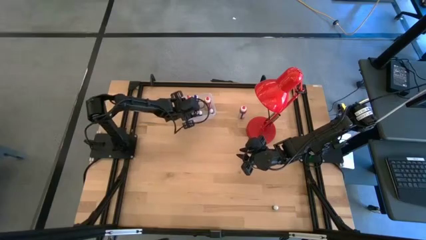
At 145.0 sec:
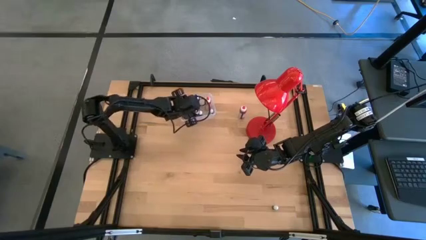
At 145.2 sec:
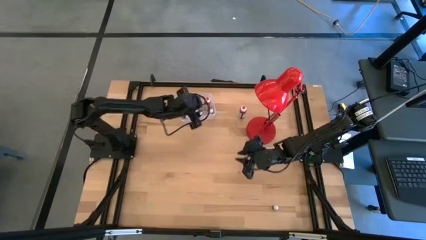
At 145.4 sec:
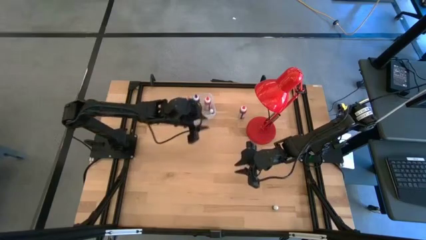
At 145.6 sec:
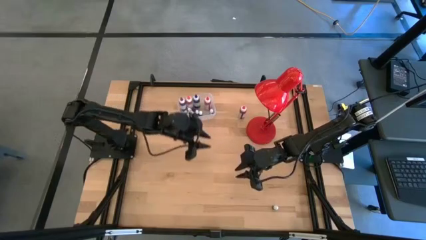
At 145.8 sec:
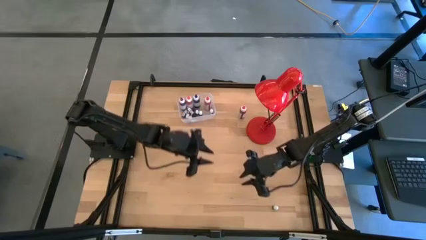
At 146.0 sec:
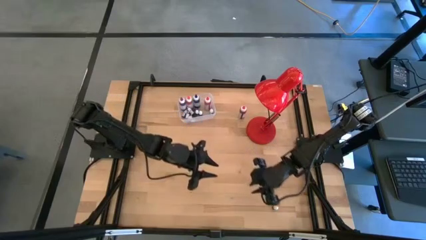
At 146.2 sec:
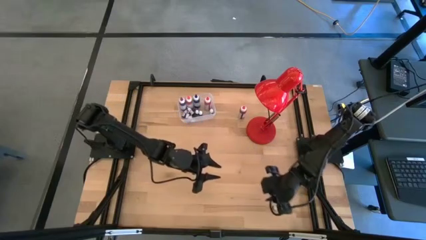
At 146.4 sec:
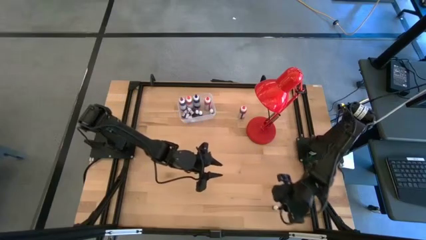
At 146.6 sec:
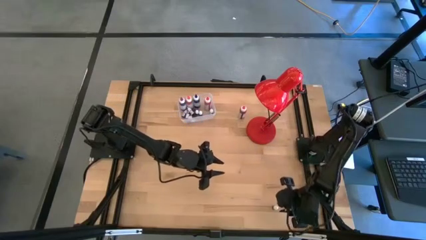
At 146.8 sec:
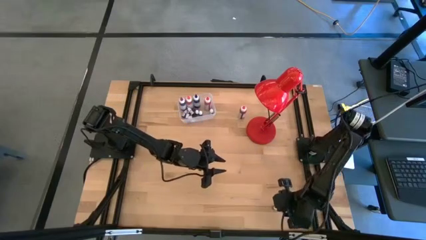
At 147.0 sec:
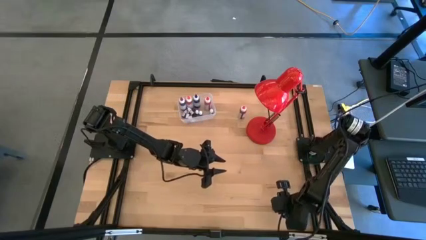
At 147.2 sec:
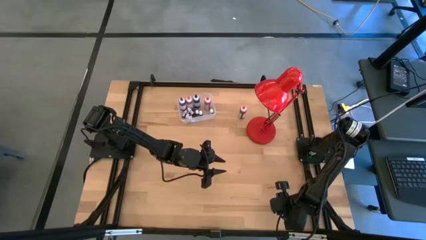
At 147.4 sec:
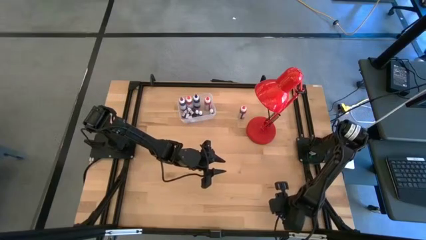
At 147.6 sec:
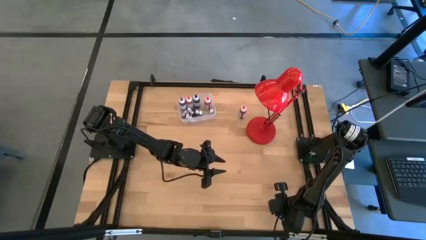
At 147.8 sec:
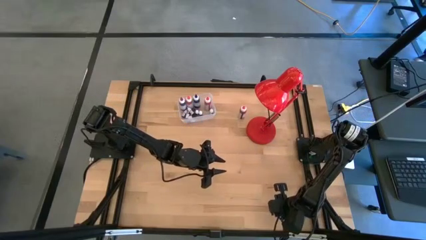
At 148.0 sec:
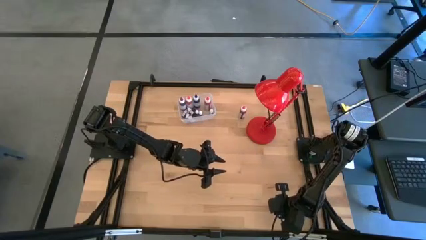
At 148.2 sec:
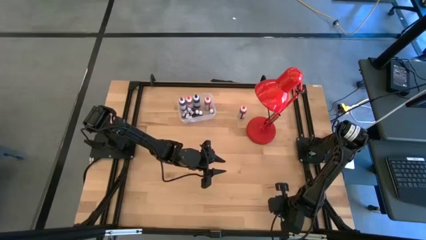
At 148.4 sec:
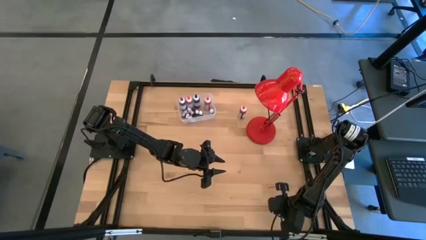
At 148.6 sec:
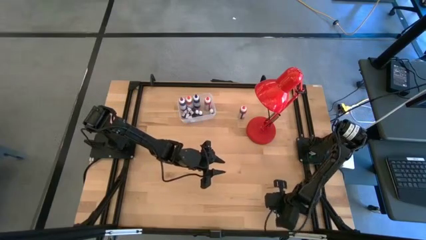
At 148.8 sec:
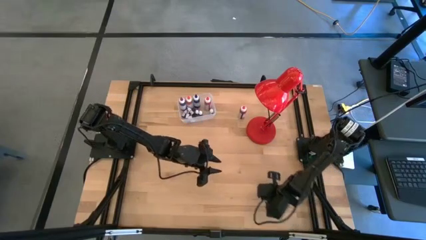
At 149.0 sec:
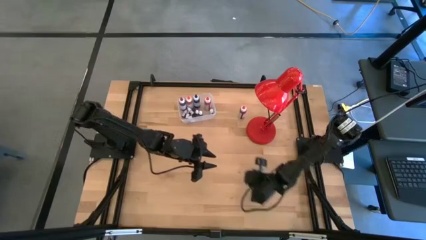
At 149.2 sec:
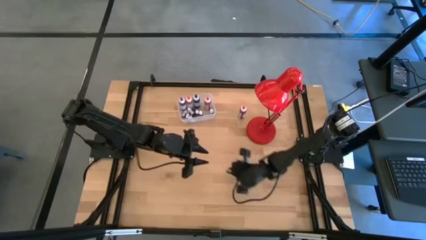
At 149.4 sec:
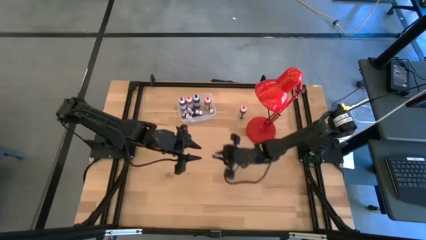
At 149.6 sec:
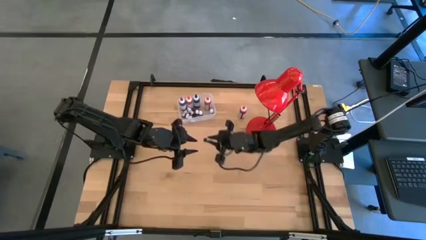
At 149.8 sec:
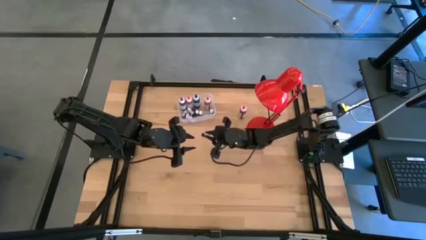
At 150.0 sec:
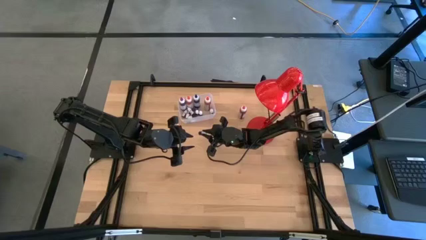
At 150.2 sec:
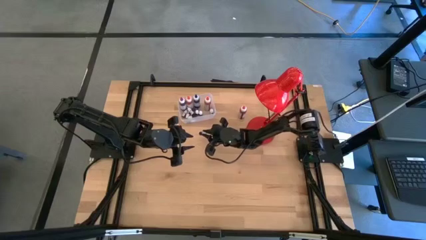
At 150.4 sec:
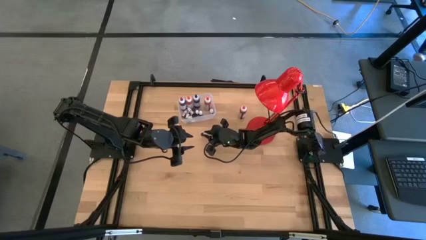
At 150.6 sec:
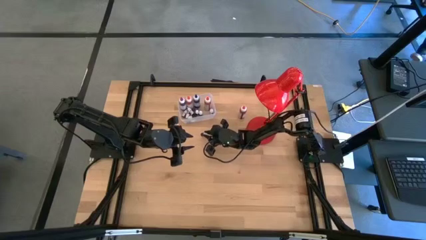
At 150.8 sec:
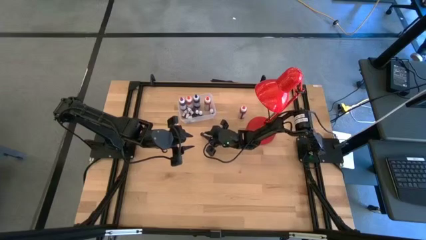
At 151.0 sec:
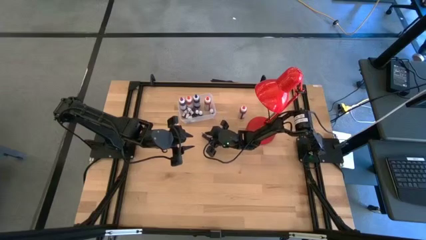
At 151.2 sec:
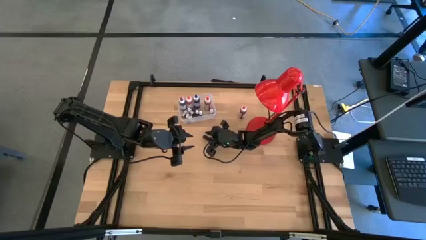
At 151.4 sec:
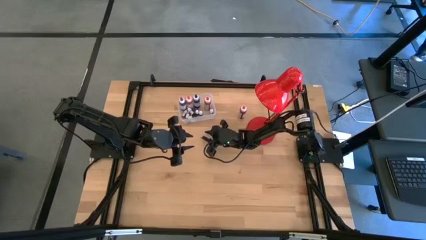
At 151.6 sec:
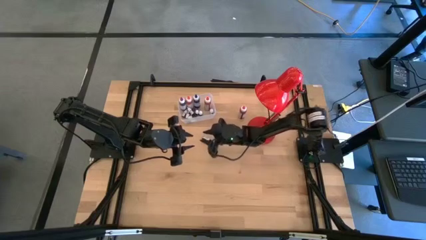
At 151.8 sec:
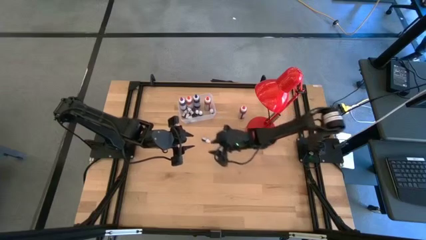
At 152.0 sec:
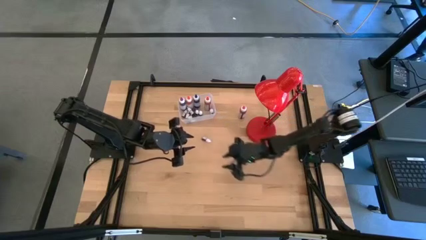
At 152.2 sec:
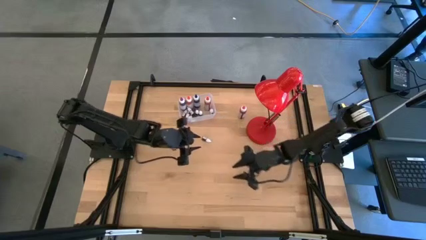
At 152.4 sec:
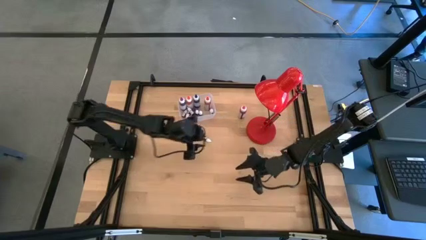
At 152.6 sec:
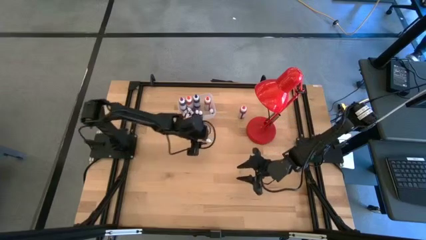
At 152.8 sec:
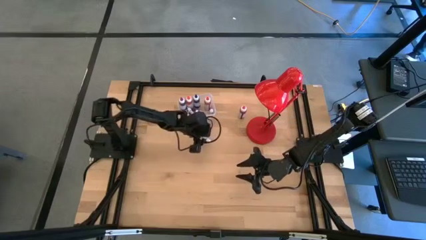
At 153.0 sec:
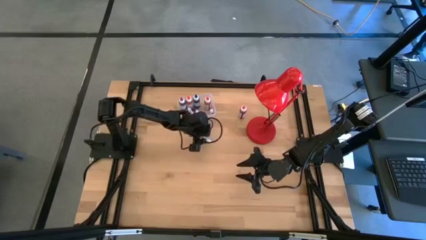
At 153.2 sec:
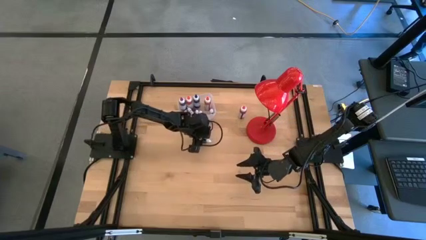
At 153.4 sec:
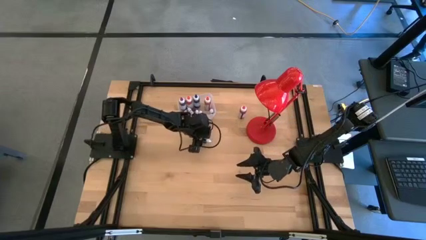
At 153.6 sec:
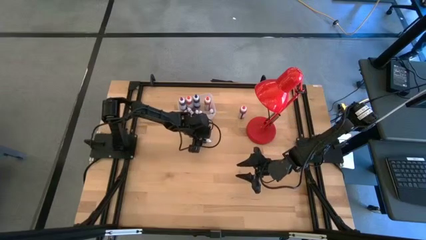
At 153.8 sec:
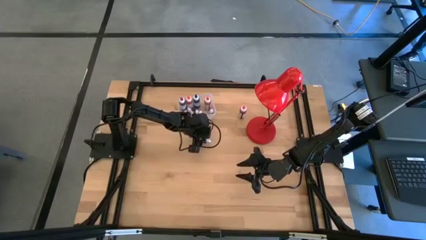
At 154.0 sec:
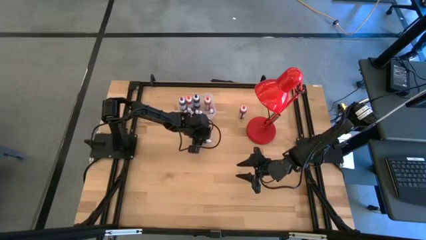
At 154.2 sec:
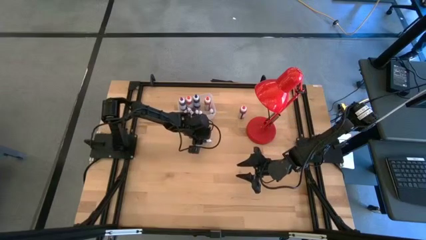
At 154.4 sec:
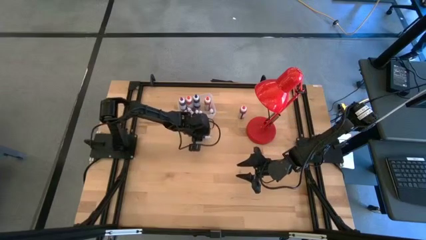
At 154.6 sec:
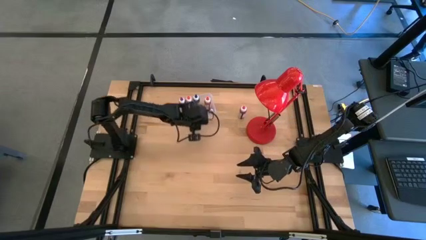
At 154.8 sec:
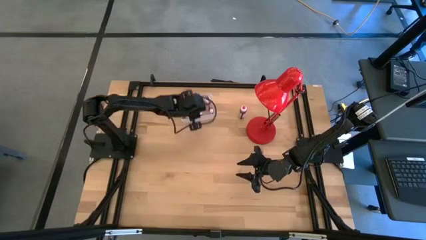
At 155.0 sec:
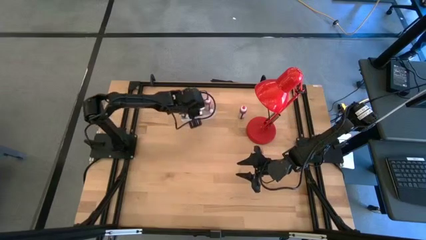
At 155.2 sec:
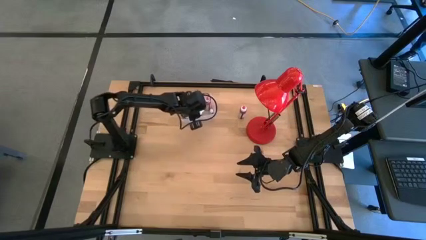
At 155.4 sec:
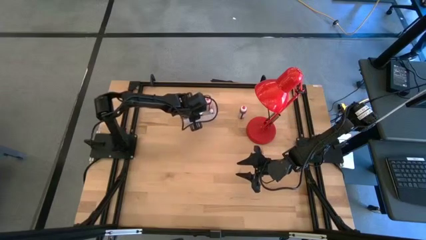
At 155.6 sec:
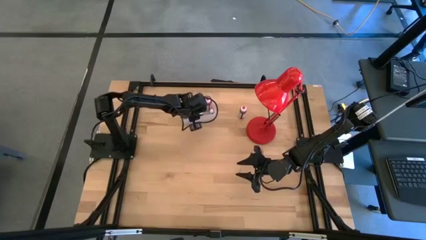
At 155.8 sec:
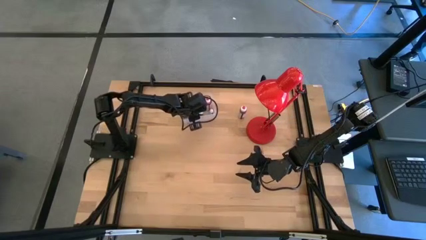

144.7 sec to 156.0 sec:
Task: Pick & Place food coloring
Put the small black food coloring bottle into the transparent bin

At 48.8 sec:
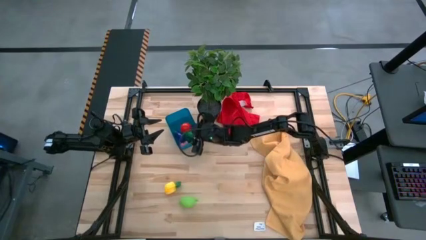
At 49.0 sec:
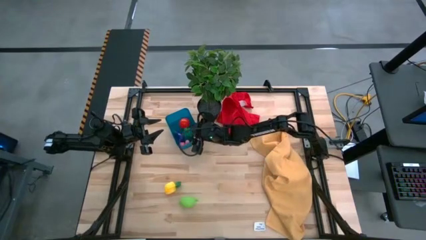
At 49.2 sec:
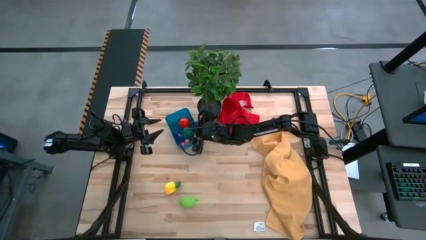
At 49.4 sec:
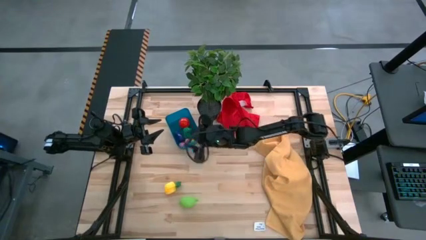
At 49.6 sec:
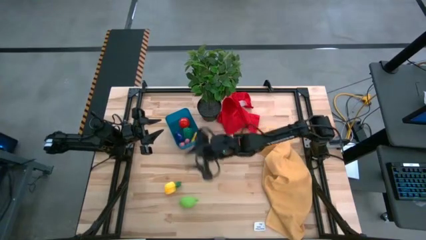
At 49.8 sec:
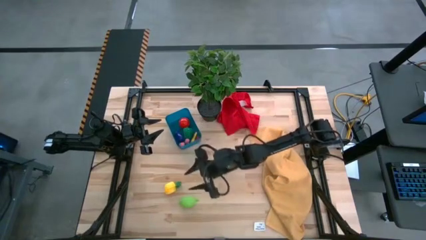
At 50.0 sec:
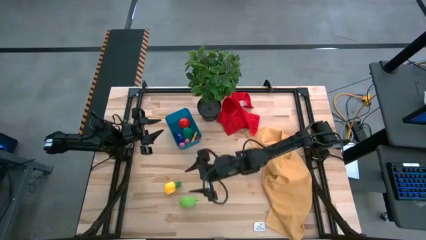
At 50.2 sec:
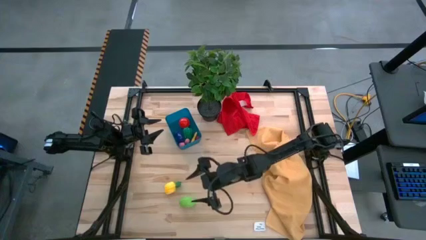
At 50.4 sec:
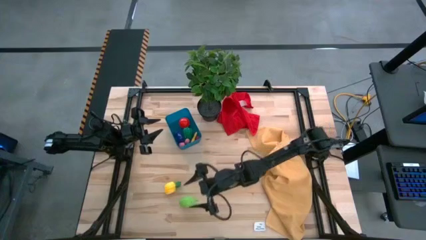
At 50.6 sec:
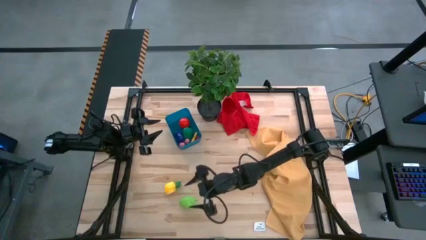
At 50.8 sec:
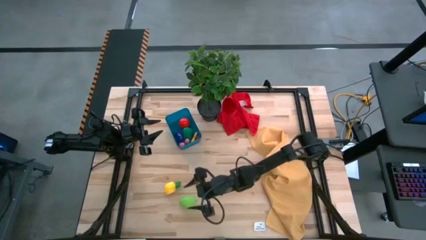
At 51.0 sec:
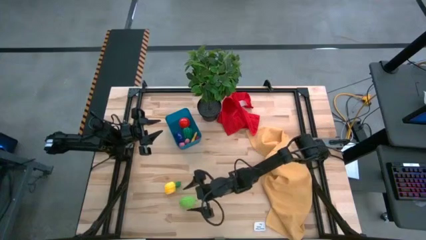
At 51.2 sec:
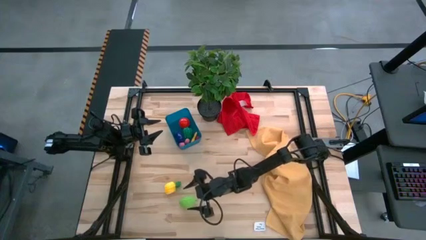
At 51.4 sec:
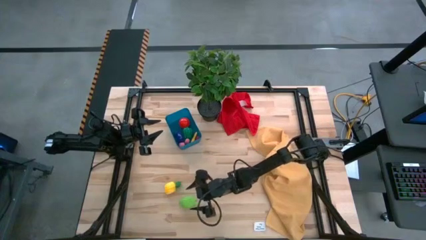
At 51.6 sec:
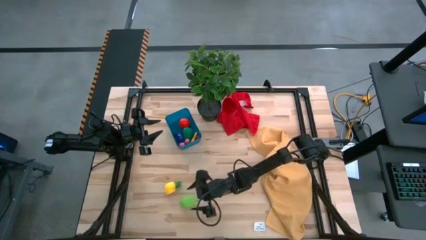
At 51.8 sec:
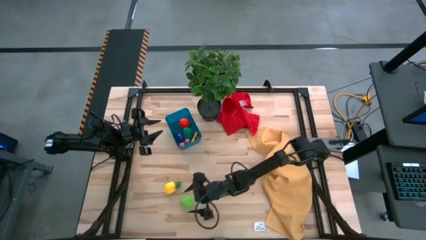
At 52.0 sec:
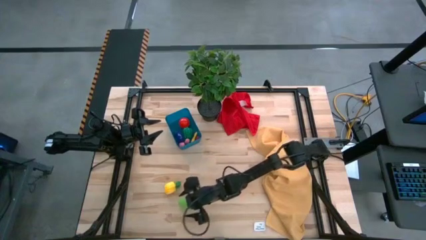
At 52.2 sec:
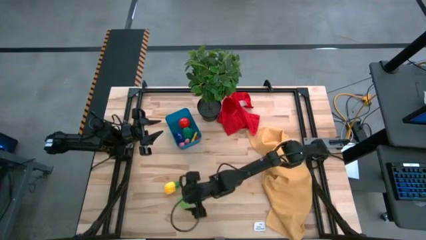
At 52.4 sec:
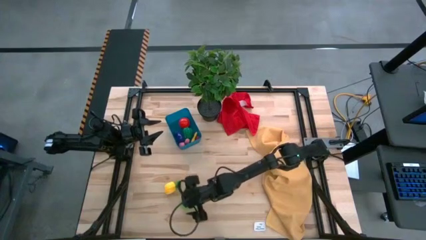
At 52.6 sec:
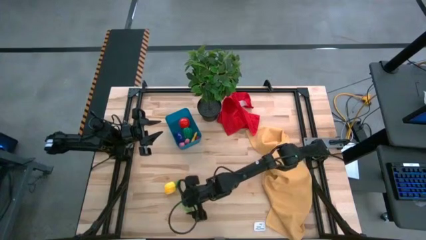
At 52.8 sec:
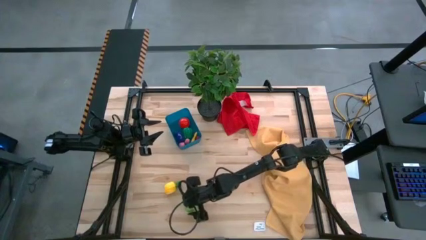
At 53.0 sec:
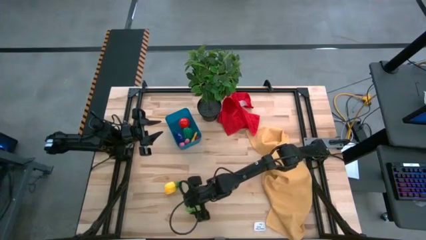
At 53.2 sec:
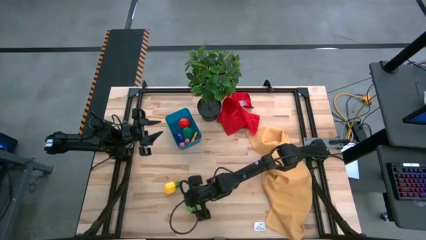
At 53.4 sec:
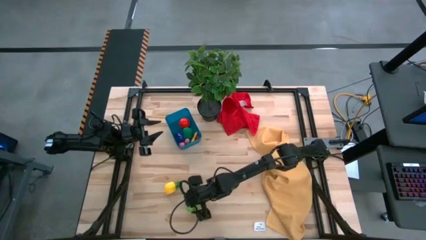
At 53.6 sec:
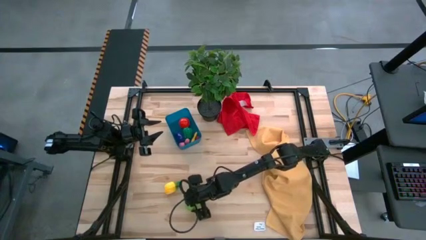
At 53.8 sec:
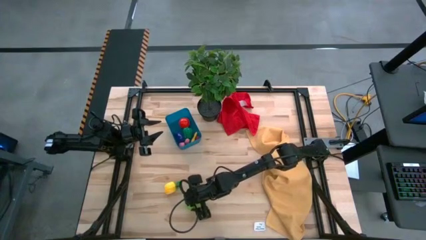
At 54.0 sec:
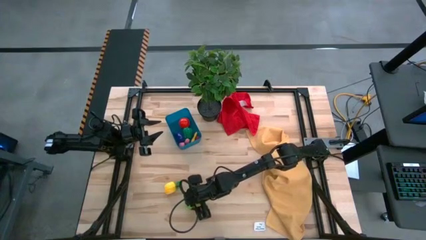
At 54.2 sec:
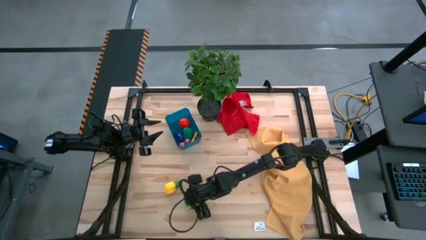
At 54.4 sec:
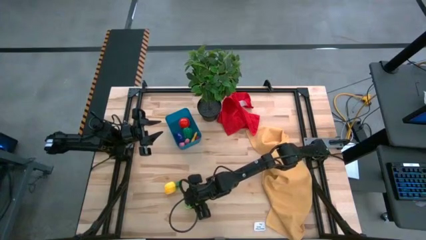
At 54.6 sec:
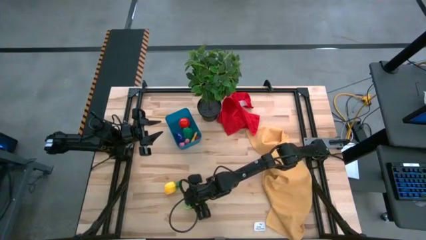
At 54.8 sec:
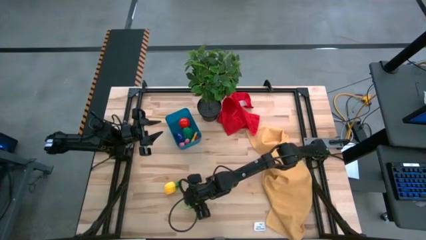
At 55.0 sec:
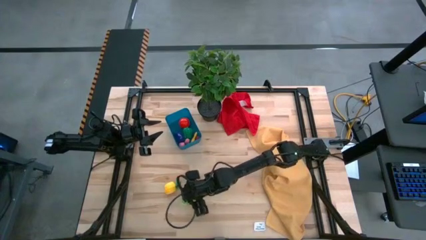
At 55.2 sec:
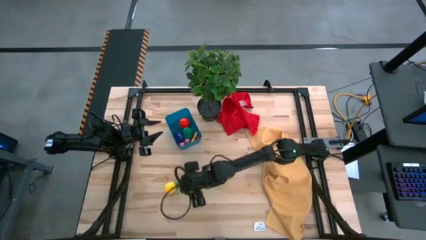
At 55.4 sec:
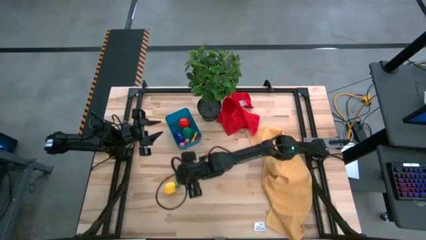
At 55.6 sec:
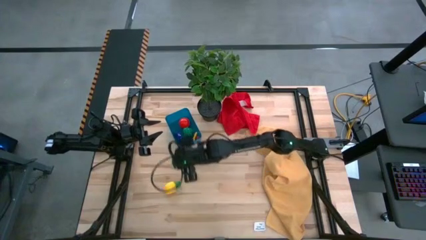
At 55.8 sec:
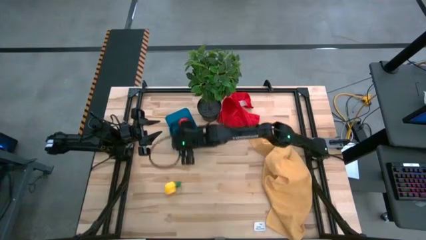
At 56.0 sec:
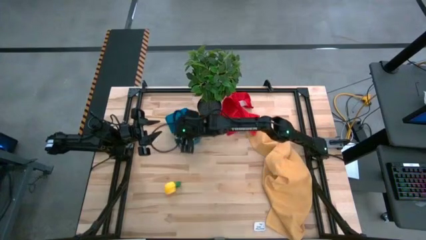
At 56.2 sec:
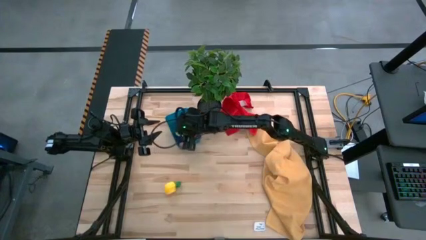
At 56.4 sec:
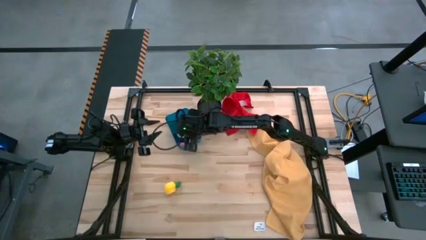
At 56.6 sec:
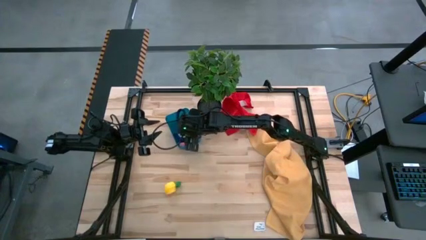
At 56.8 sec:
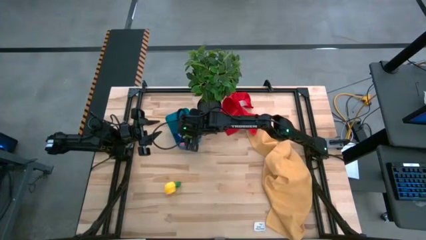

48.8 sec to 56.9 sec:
Task: Pick and placing Produce into tupperware
Put the green melon into the blue bin
